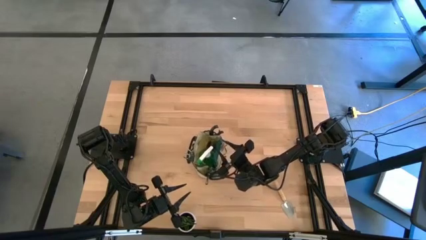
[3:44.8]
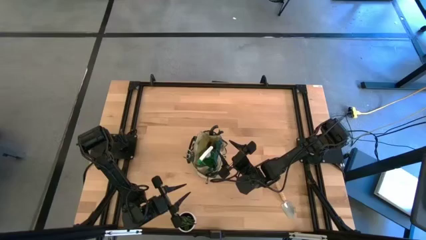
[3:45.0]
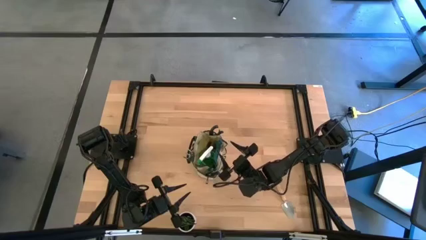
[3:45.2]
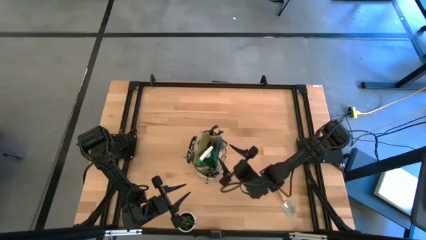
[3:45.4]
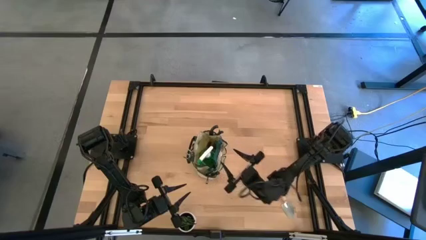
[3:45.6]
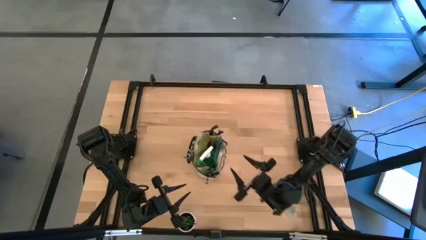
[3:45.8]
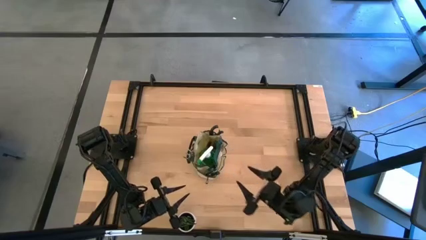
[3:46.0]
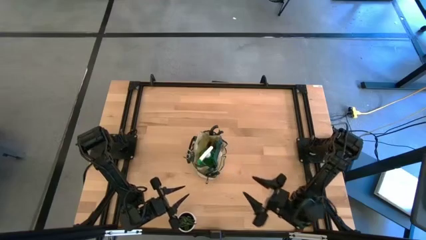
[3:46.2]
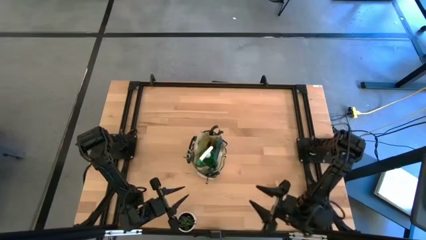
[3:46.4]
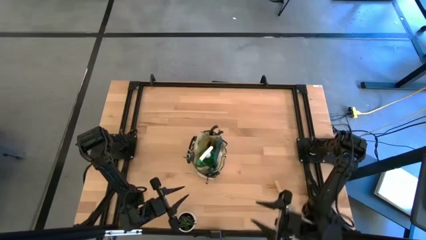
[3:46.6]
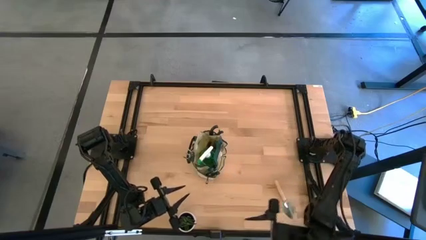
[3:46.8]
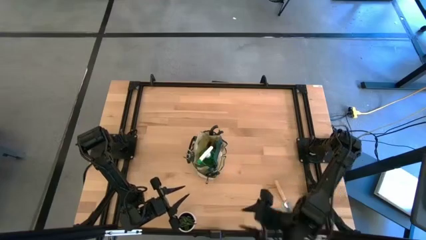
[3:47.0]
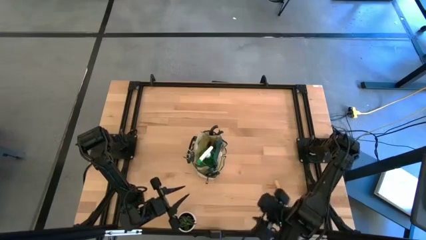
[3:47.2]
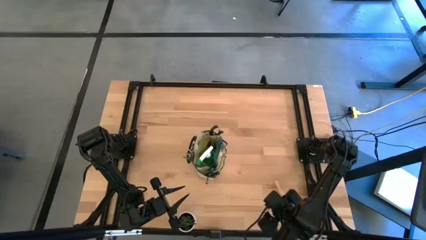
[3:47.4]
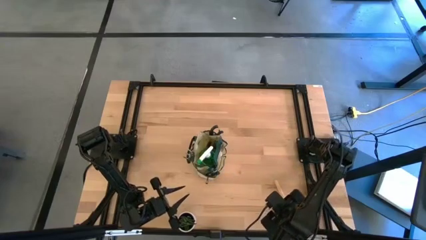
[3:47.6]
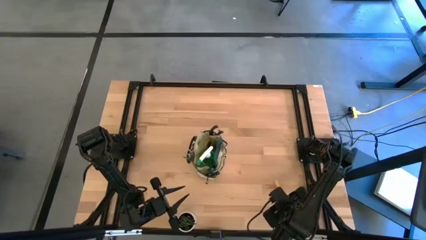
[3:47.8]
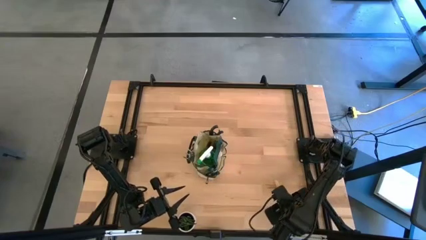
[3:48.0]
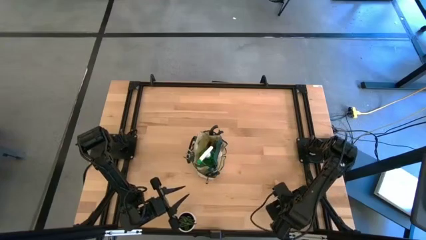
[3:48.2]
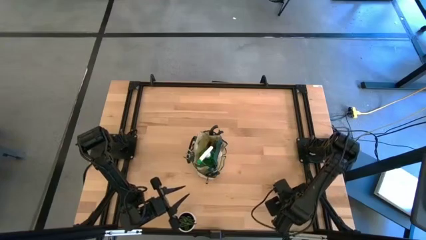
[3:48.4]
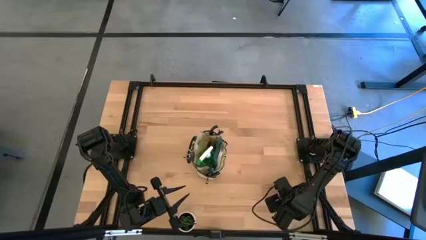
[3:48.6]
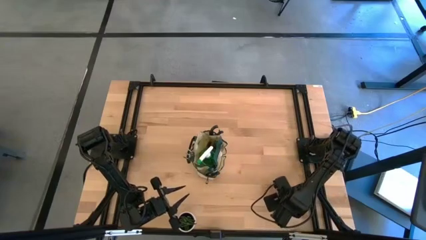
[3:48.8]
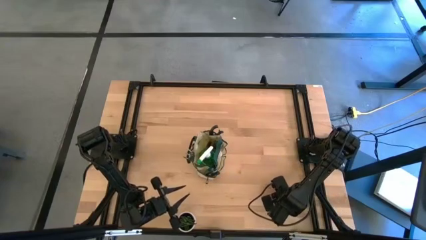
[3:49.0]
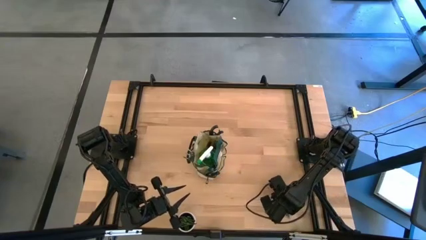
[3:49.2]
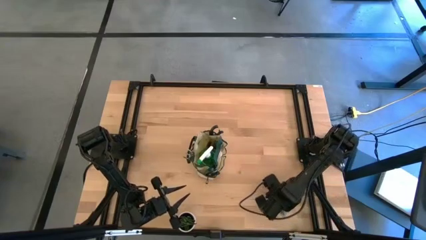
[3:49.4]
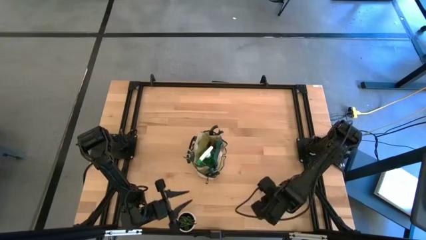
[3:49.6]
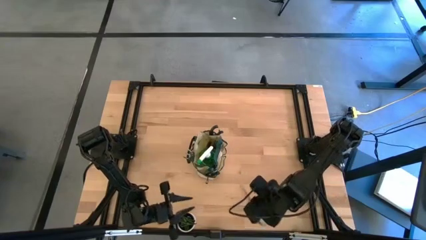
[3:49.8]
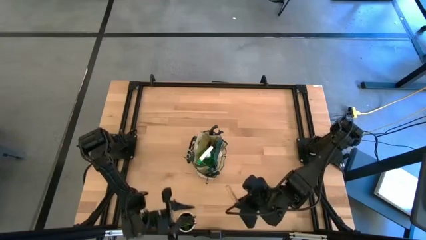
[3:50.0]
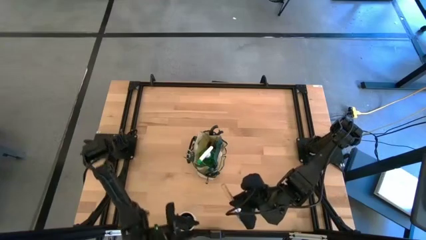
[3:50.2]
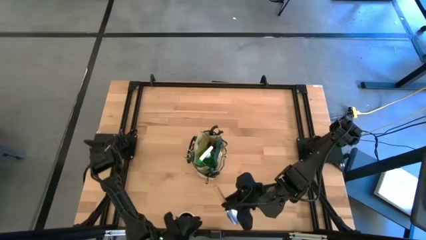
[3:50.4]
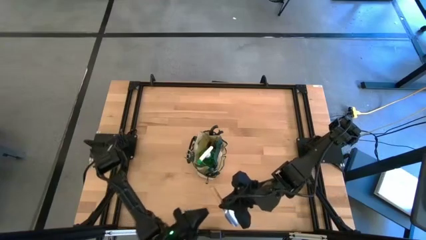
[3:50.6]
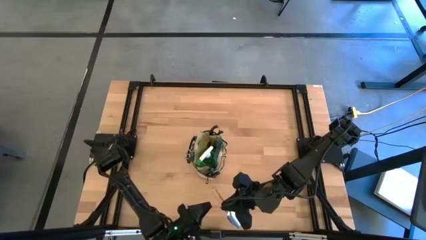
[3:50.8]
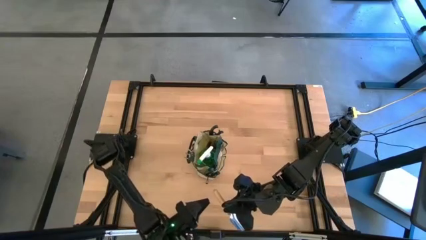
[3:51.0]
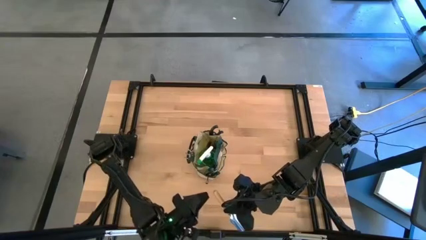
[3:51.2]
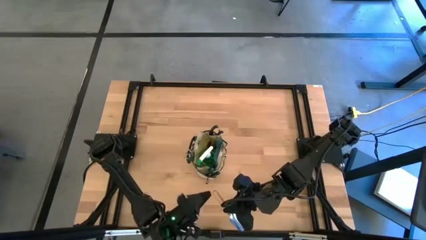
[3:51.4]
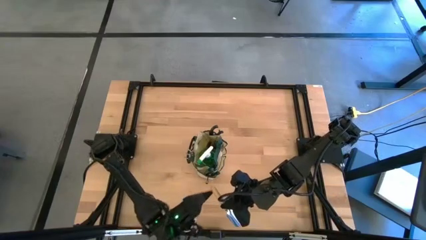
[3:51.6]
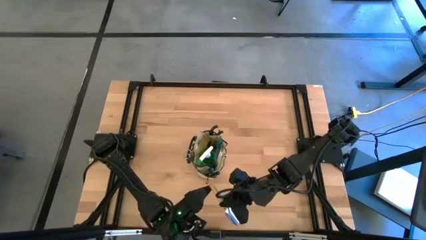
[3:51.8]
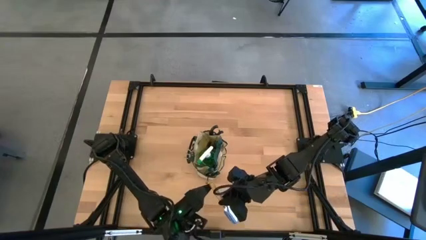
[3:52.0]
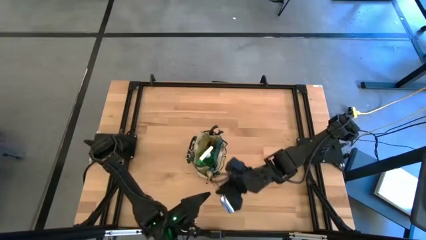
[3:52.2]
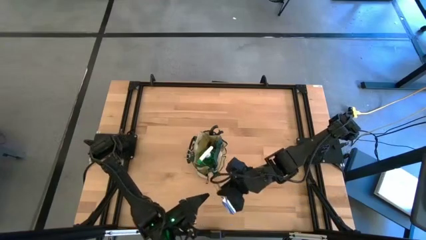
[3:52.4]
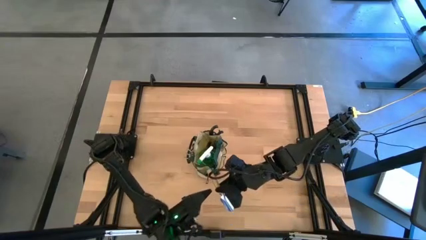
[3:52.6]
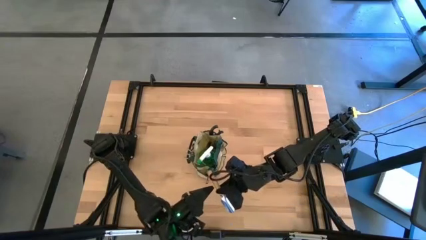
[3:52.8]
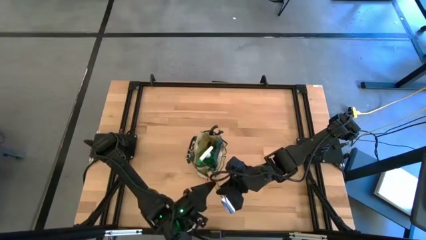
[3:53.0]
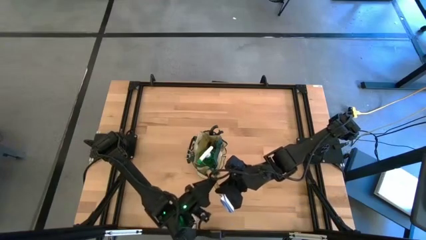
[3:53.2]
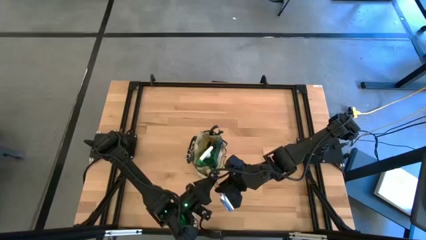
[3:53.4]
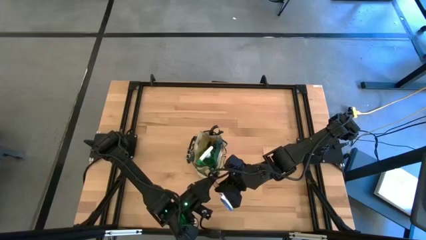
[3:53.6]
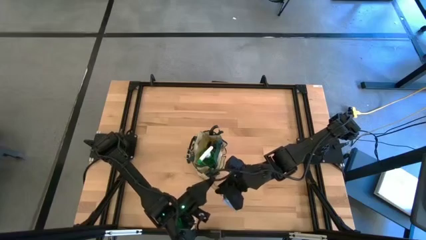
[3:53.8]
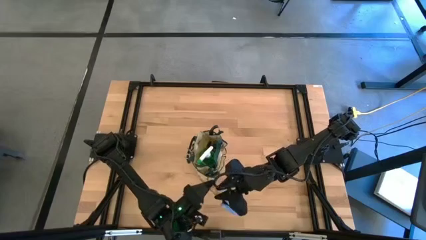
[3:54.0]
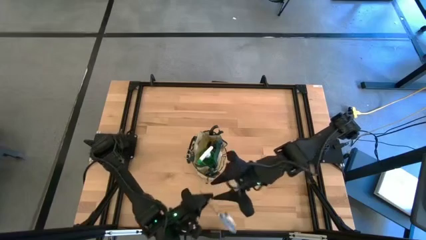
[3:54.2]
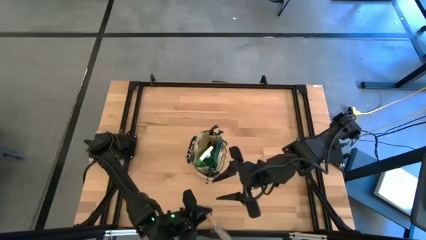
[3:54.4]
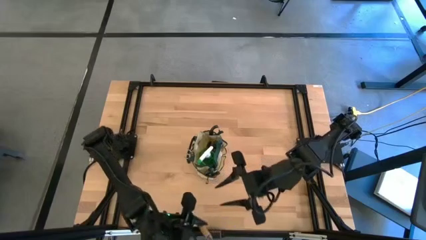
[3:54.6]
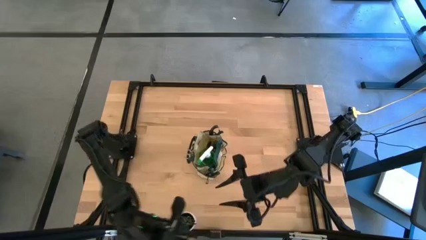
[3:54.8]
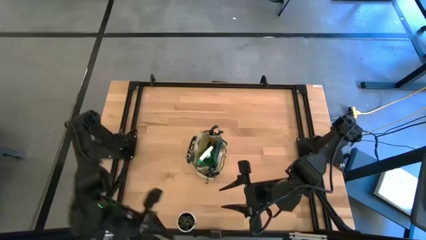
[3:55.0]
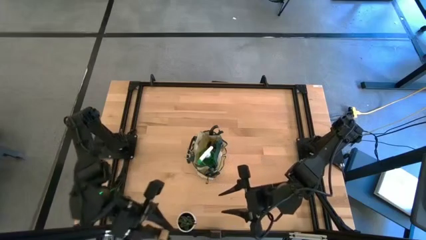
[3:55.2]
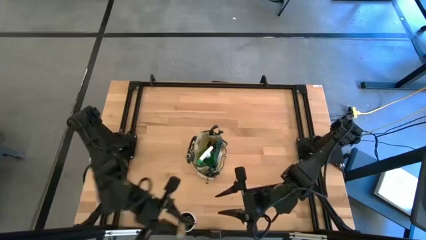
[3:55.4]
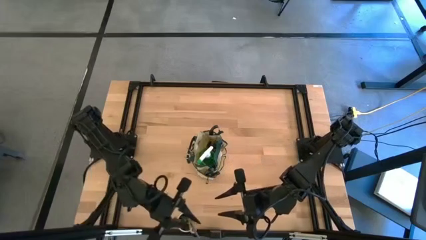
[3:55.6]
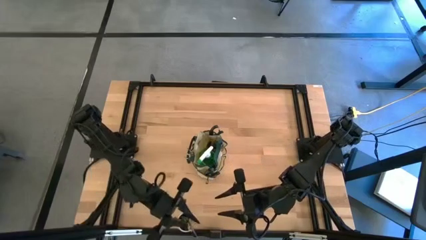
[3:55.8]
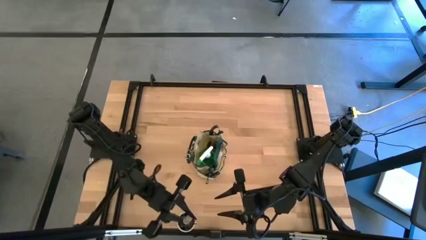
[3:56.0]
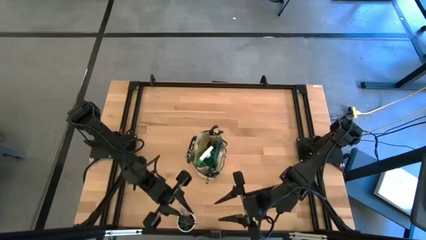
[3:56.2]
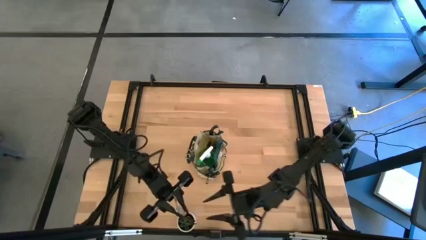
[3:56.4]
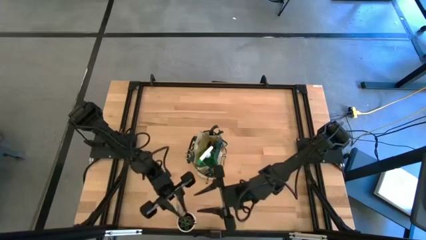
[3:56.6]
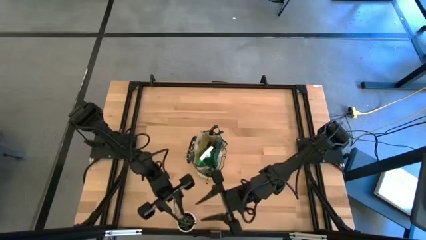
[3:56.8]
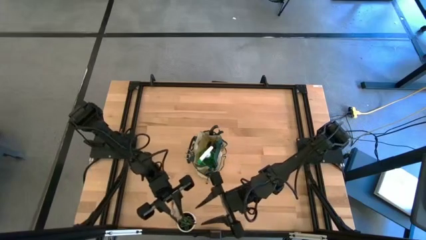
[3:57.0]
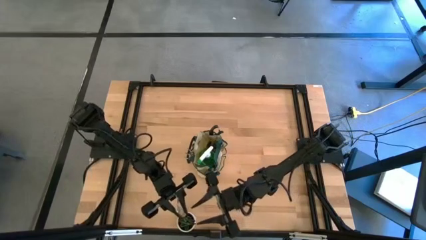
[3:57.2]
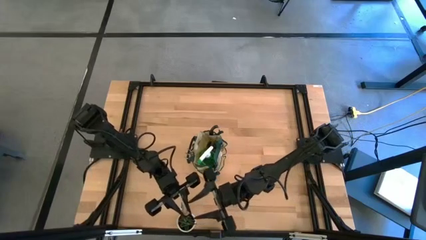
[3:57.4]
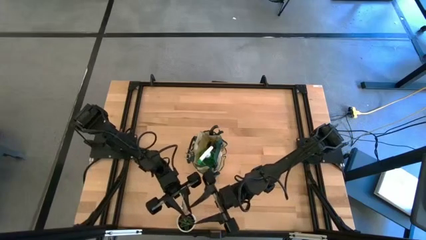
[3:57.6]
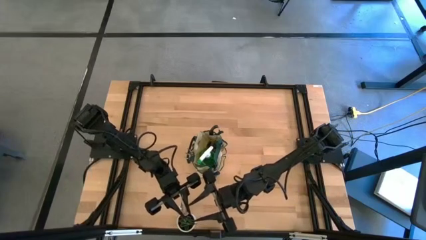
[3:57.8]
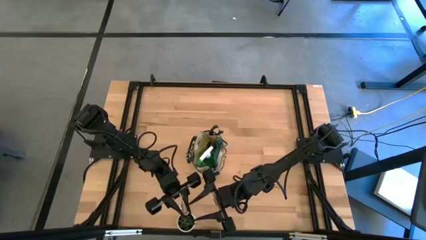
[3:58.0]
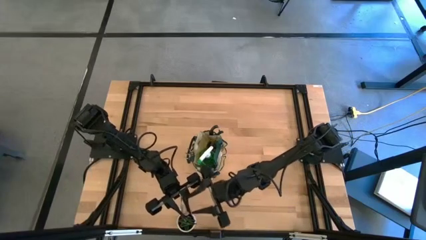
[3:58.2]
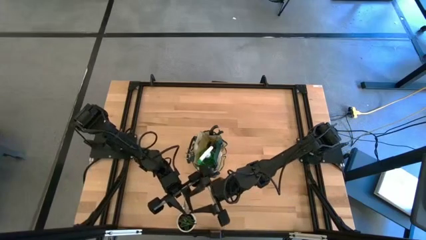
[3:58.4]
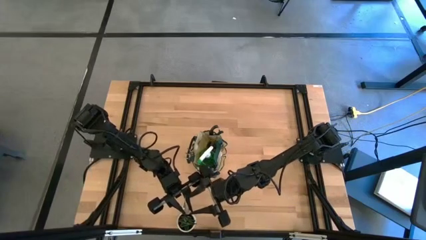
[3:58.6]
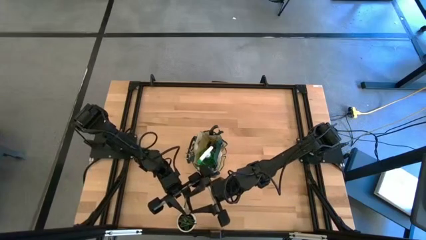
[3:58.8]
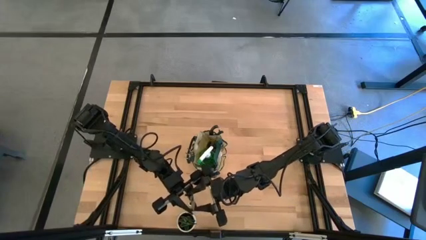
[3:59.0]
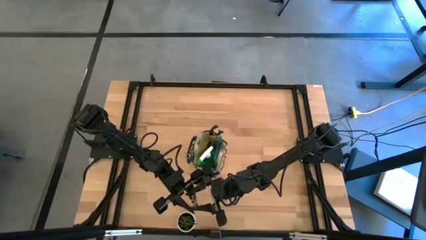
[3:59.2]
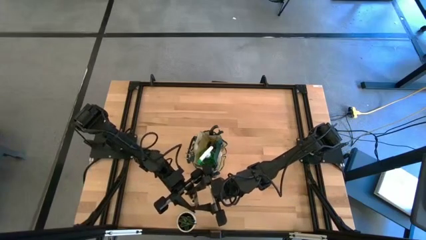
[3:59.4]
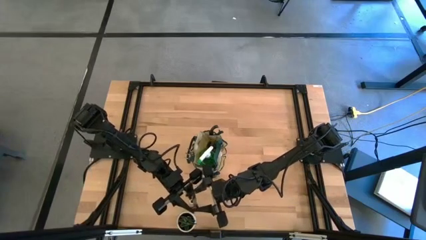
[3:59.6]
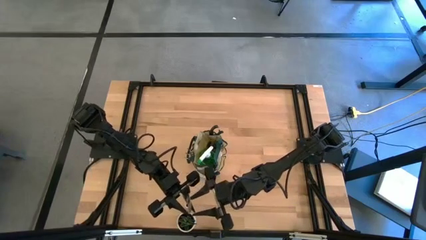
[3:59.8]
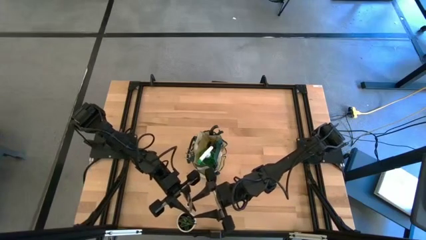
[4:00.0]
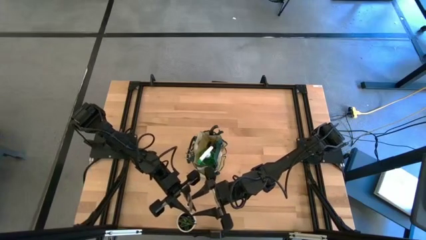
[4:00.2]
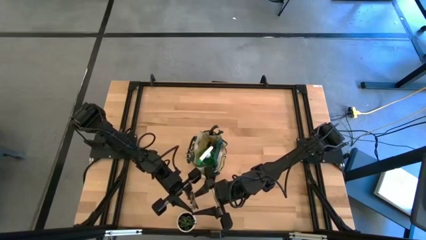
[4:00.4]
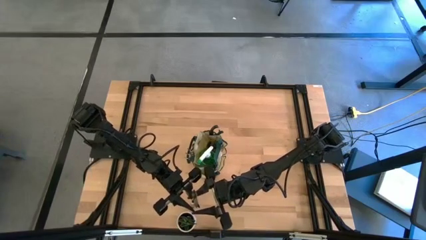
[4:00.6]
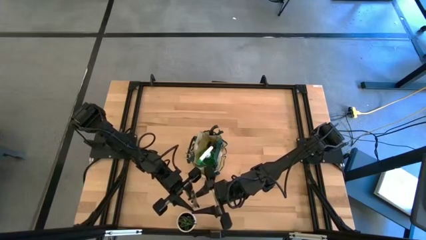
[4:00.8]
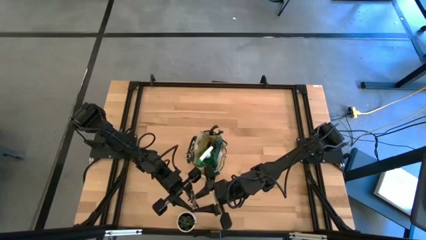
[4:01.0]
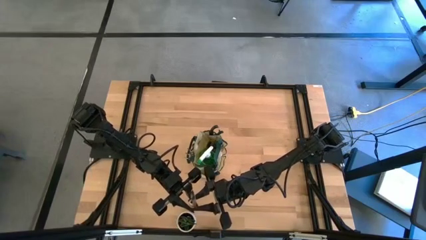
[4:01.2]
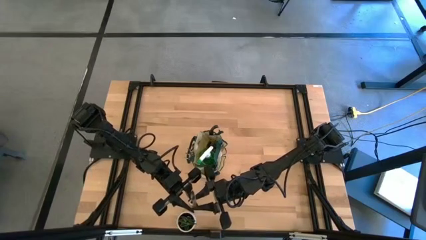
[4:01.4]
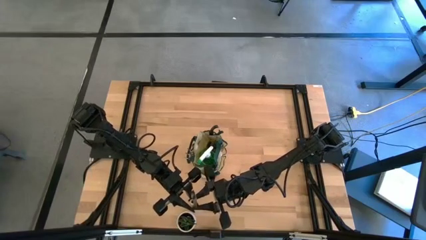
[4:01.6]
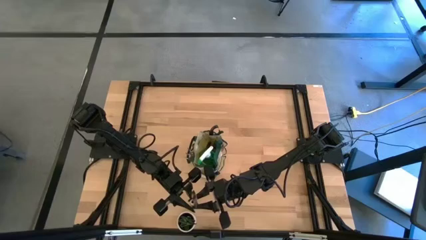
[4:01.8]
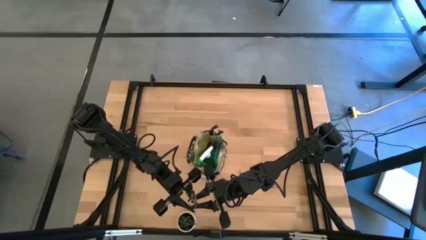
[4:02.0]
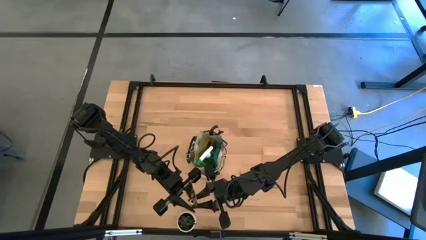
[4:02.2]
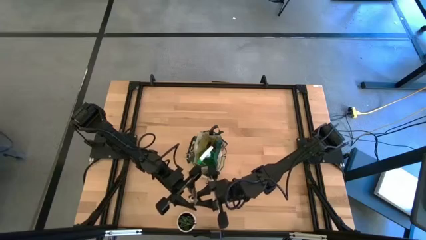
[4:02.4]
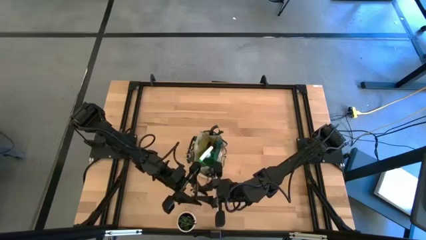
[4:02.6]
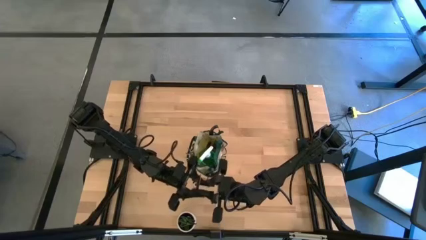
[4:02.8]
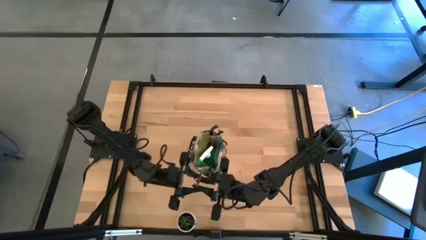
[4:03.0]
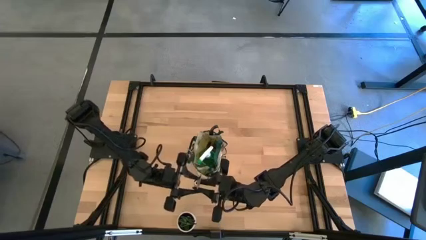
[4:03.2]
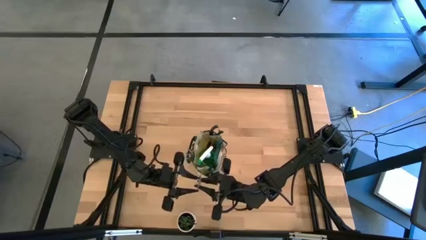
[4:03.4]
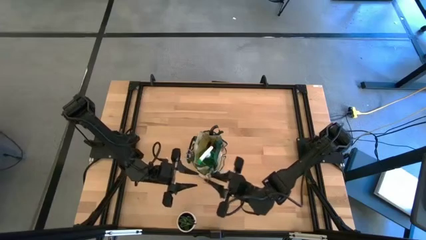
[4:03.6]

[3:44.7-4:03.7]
Task: Pick & Place Garden tools in Gardening bag
Put the brown trowel into the side pocket of the green gardening bag
